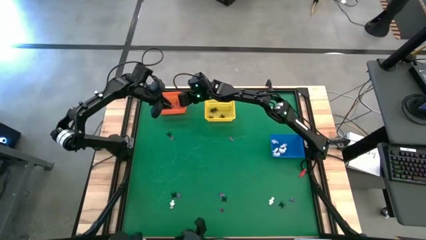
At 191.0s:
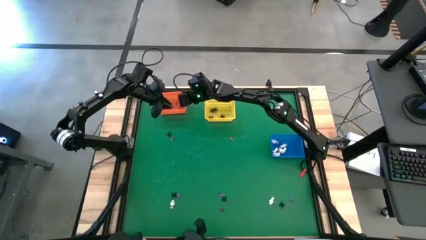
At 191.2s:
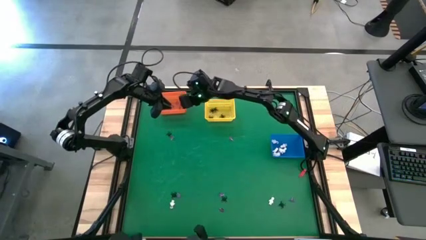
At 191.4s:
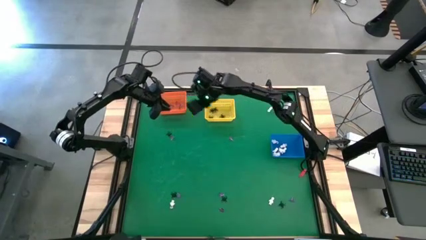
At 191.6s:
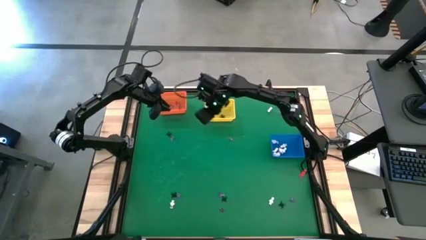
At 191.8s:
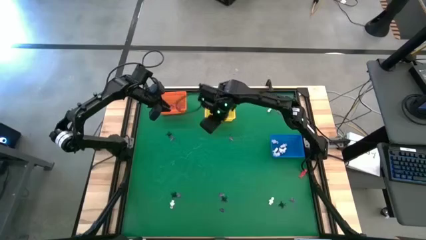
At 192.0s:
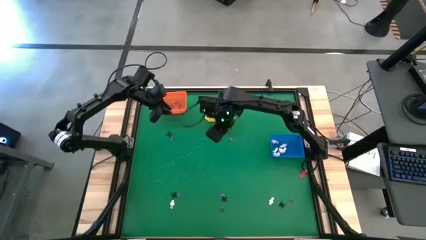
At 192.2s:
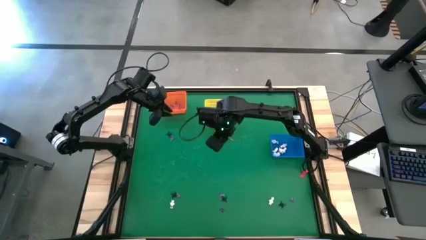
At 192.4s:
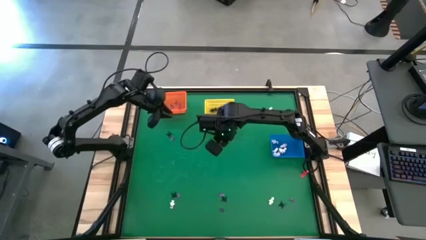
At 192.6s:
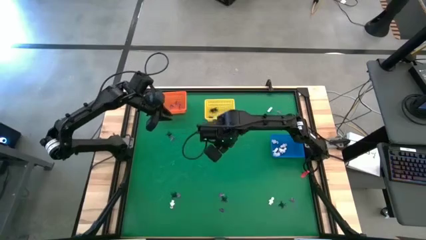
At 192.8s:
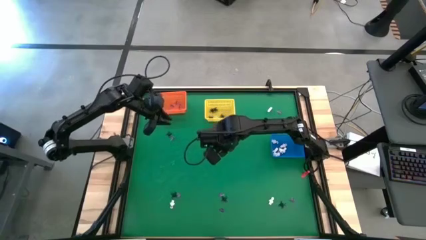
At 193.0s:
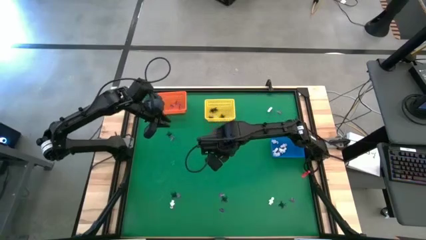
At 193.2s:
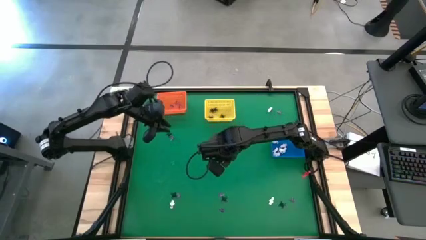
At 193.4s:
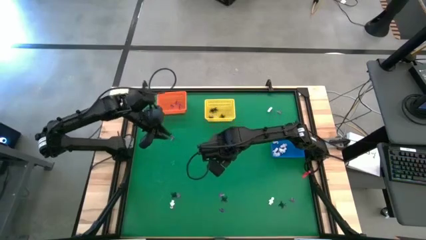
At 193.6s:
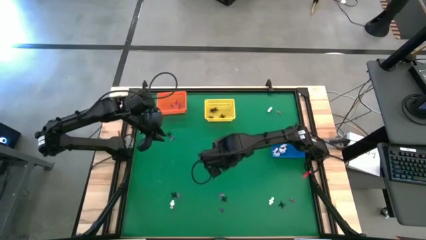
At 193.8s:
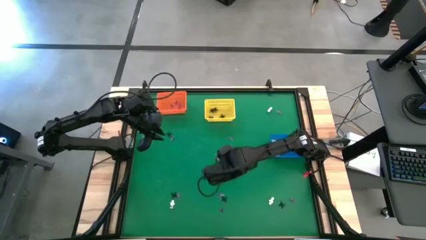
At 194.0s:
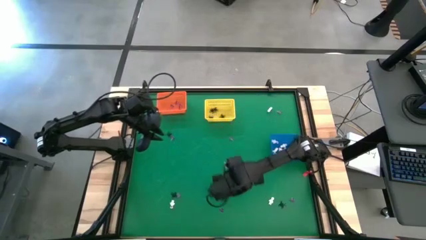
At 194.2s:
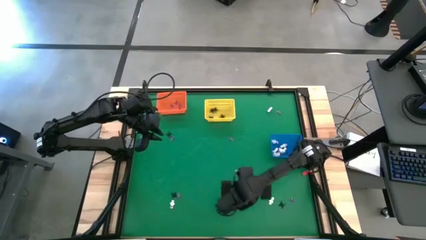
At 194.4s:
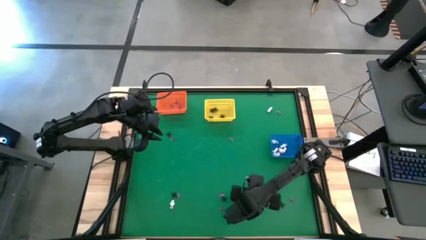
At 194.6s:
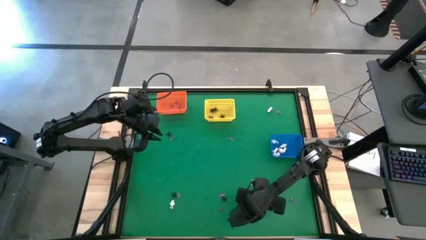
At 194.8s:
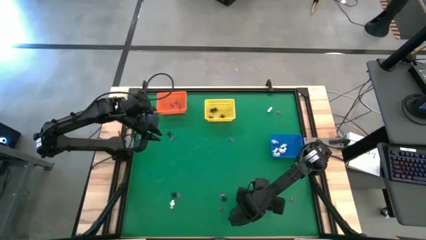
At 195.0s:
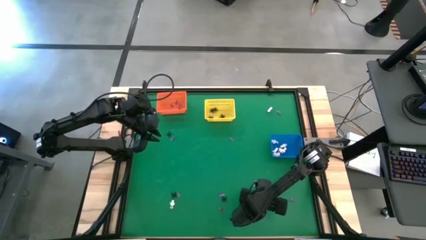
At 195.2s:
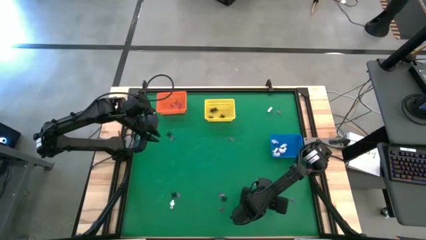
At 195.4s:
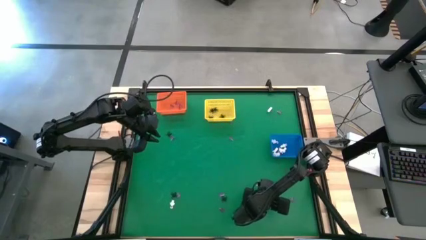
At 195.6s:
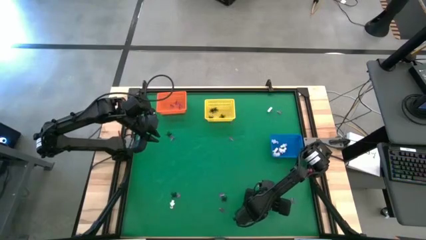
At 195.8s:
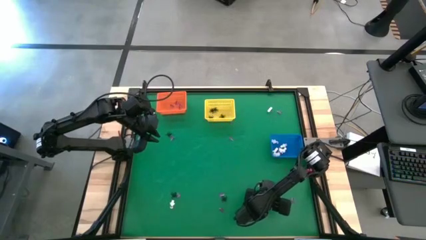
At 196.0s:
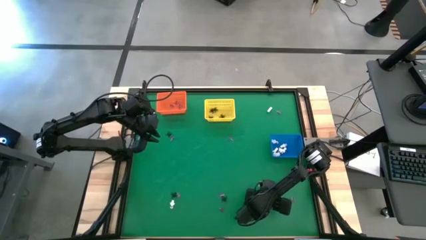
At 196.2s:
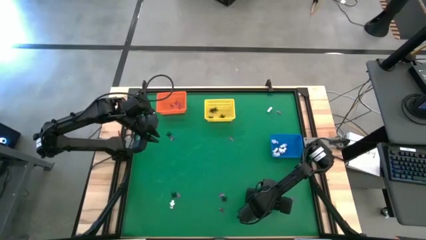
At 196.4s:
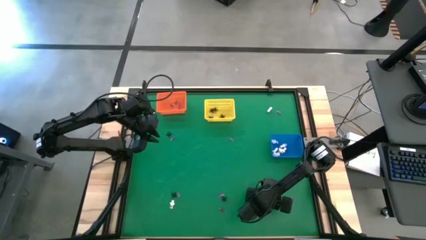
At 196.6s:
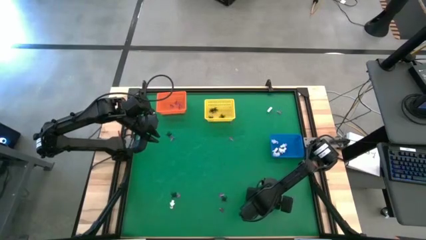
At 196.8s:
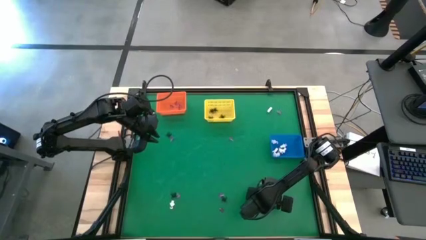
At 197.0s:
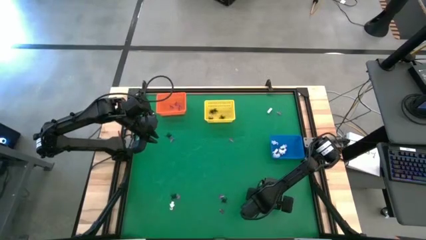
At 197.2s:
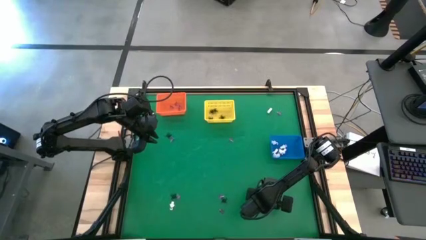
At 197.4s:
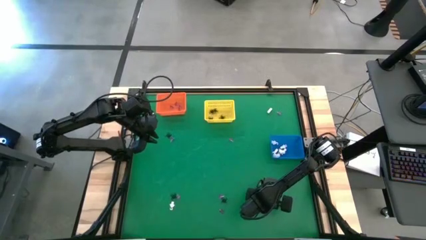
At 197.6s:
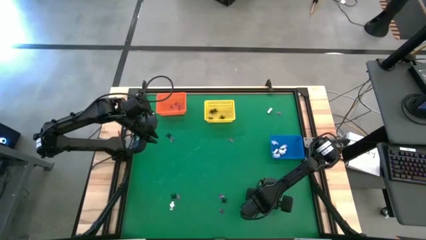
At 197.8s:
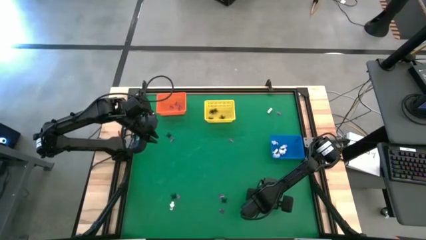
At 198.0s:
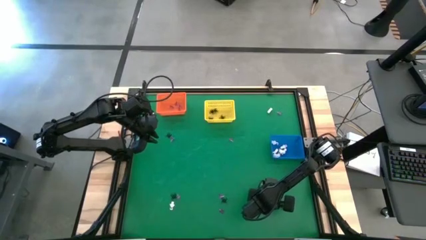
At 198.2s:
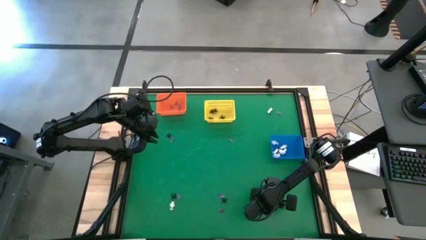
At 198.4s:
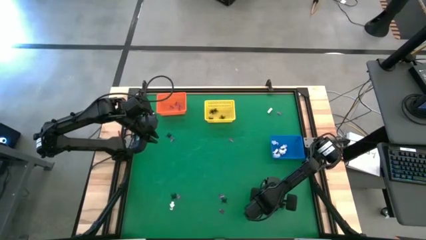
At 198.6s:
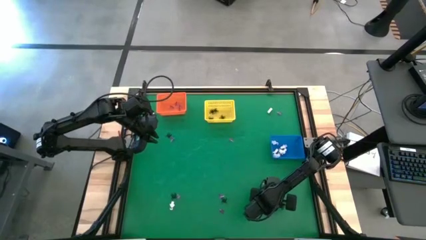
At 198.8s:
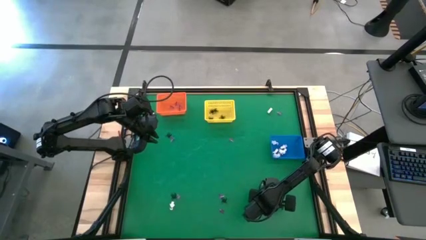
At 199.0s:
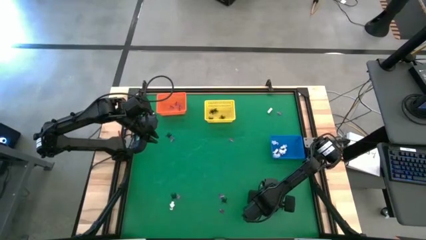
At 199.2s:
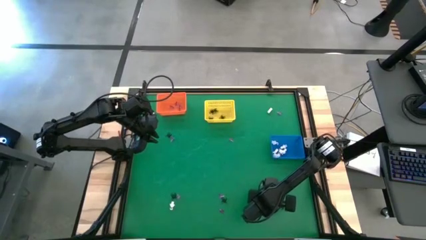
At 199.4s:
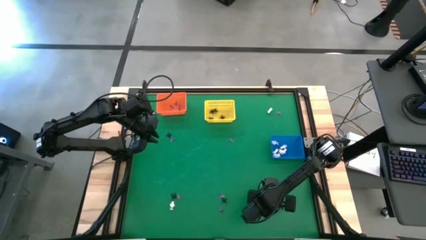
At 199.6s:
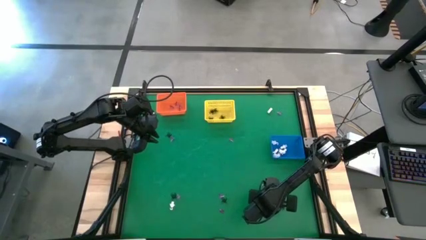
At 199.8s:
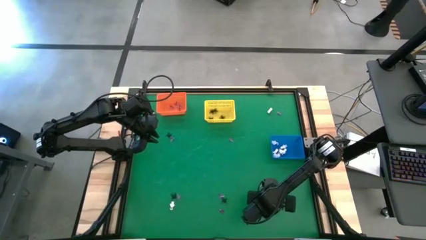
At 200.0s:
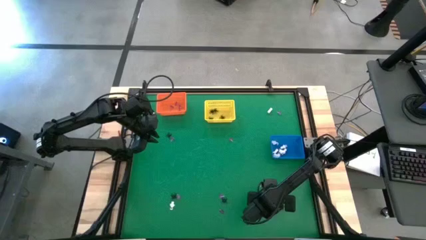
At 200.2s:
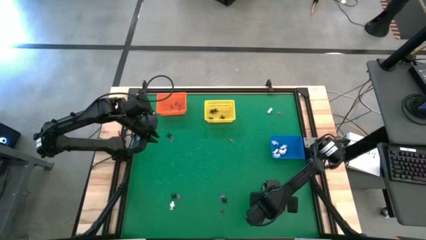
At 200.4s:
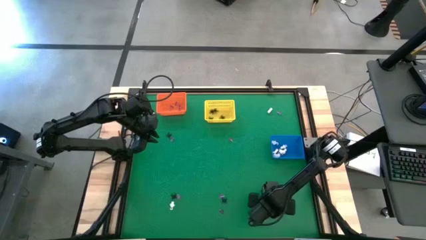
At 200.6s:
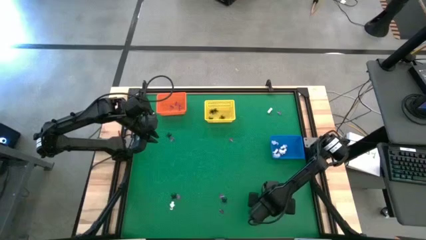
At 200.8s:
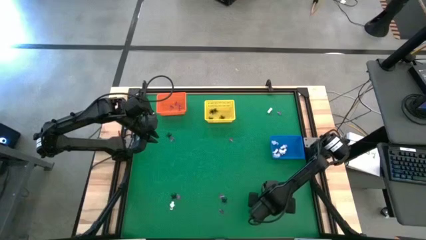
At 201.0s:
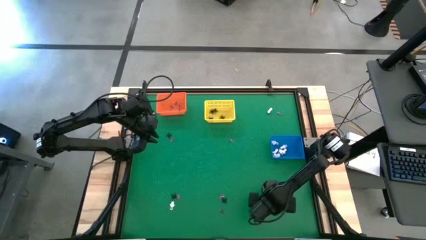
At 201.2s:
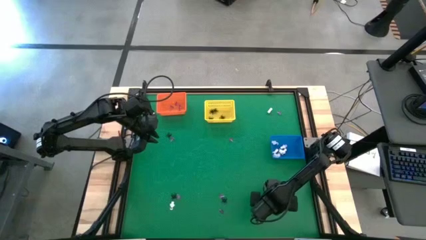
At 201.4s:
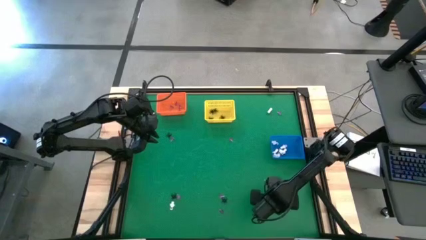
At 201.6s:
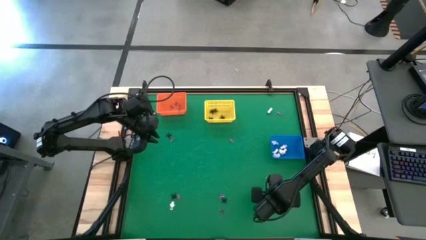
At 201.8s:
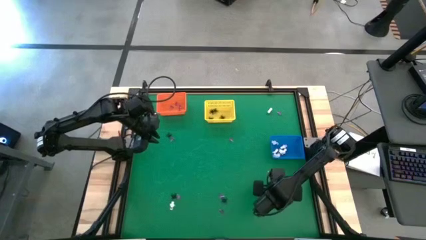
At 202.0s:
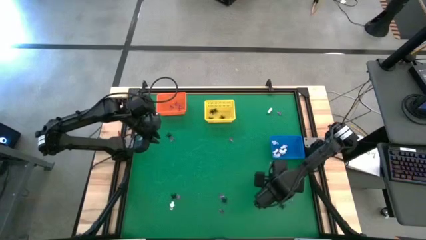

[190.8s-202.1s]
Task: Sort Halloween decoration
Put the white skeleton toy into the blue basket

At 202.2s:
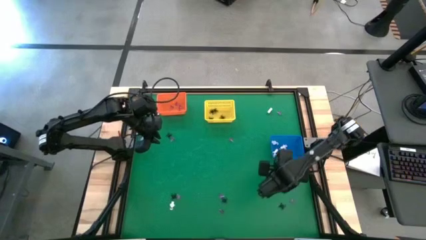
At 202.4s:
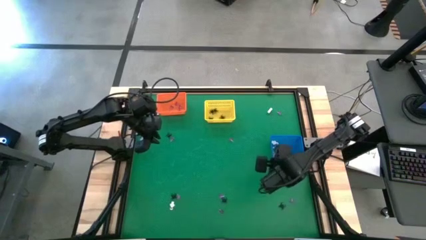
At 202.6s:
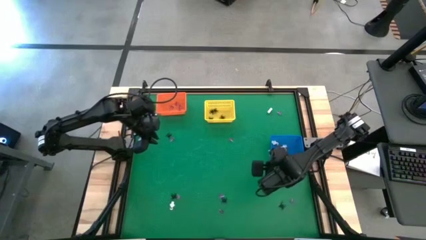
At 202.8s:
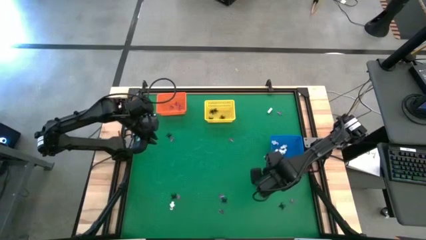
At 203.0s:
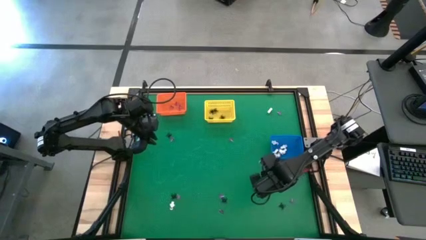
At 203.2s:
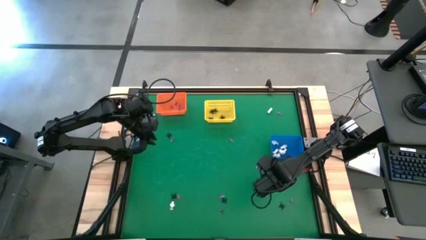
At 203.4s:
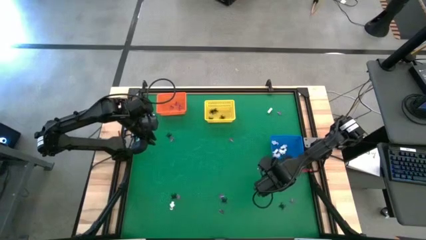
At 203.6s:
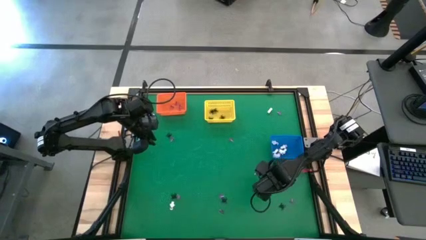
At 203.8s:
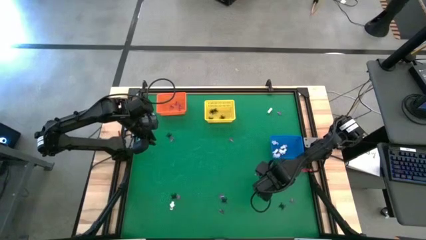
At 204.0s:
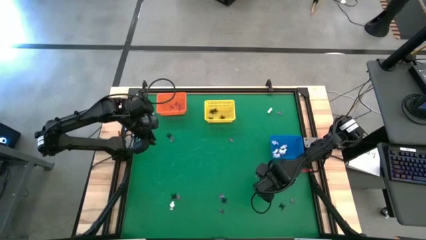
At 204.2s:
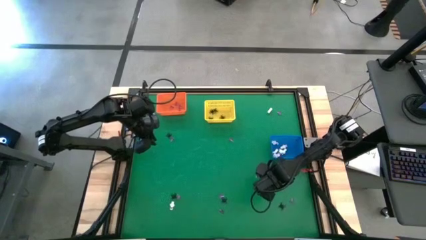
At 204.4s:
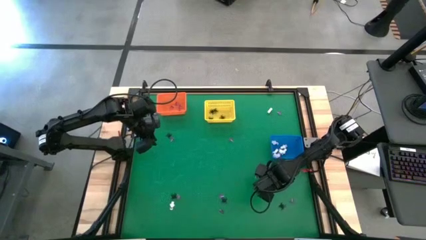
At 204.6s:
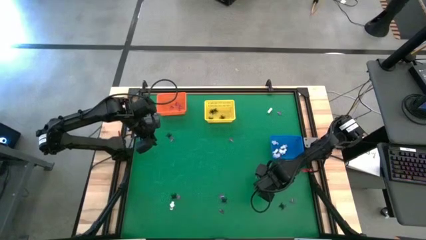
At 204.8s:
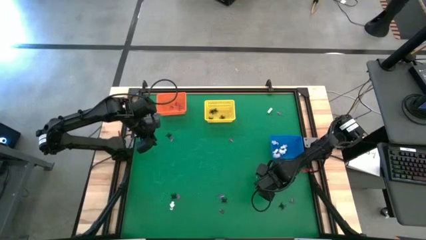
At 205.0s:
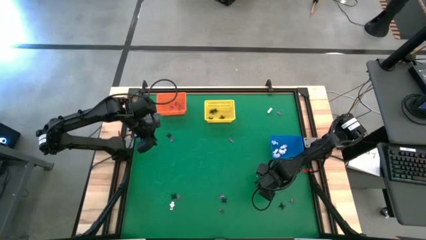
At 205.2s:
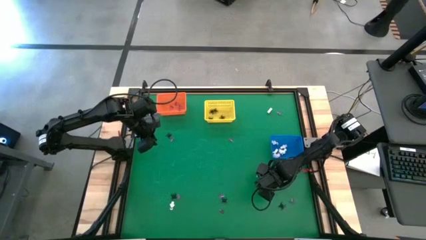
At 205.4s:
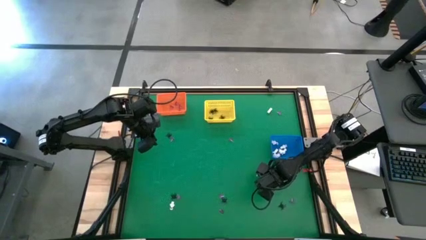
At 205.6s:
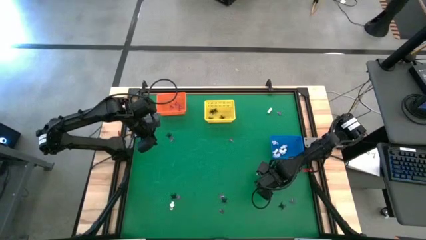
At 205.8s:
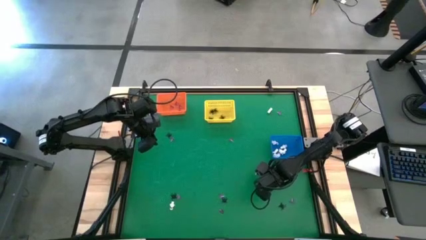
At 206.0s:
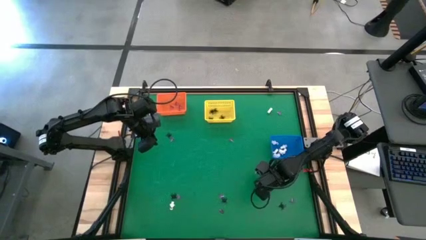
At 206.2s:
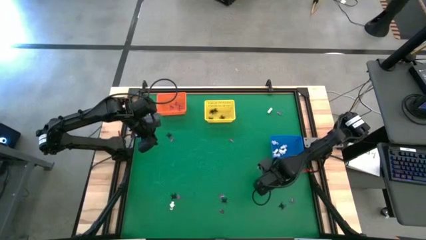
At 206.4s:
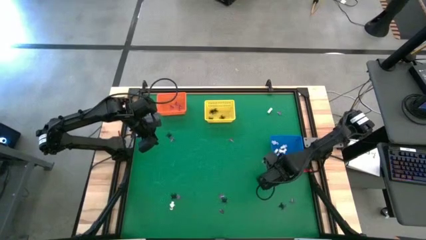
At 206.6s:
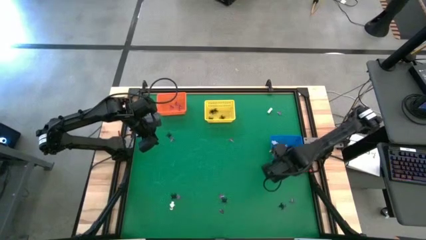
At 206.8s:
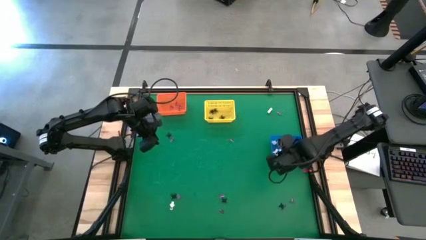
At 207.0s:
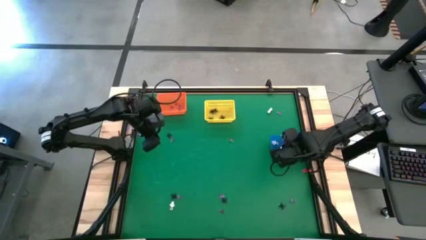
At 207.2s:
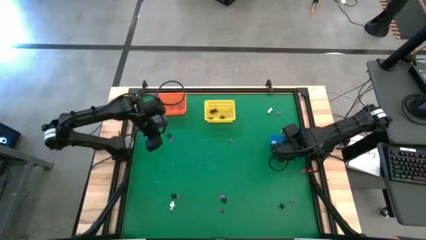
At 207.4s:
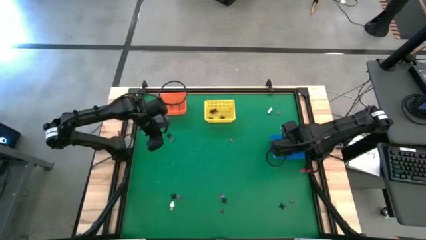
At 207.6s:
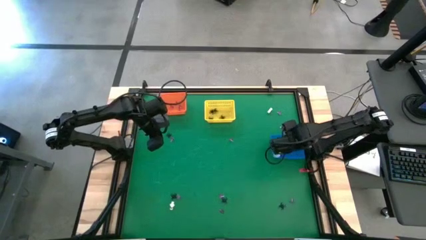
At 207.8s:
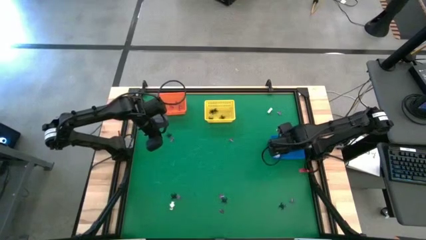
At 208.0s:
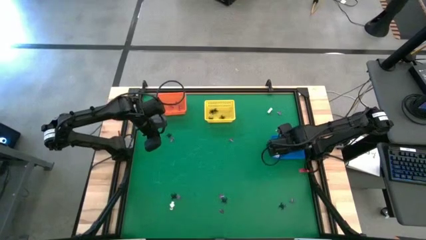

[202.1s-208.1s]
Put the white skeleton toy into the blue basket
